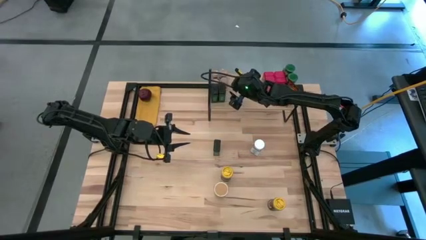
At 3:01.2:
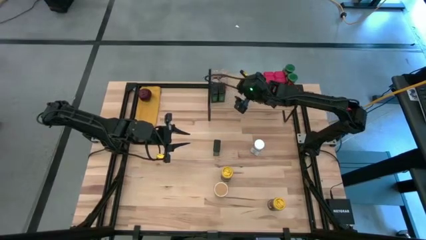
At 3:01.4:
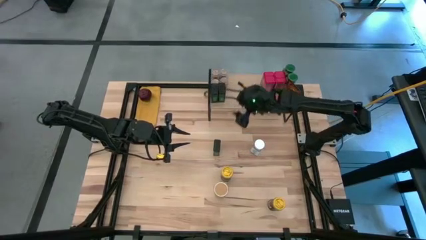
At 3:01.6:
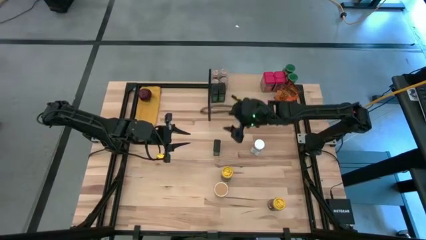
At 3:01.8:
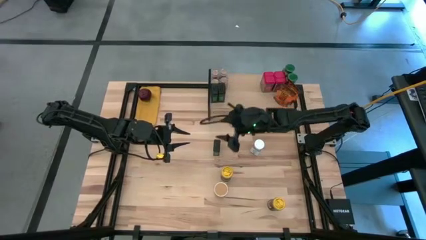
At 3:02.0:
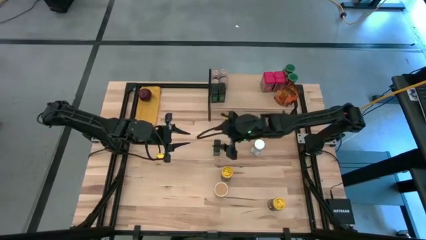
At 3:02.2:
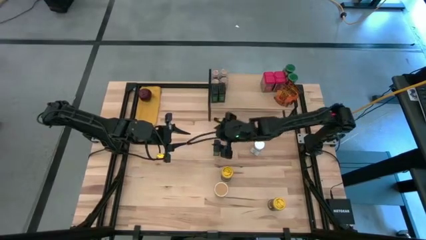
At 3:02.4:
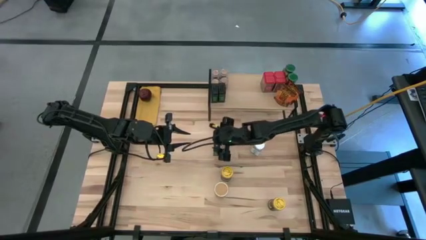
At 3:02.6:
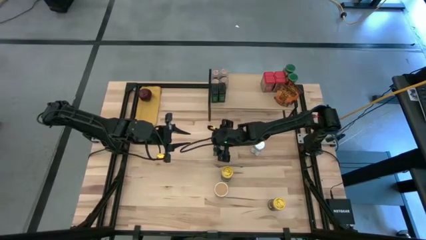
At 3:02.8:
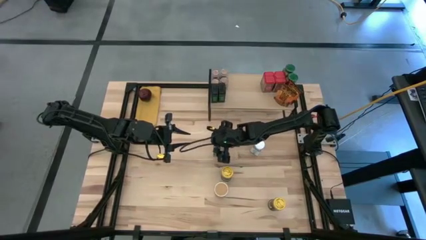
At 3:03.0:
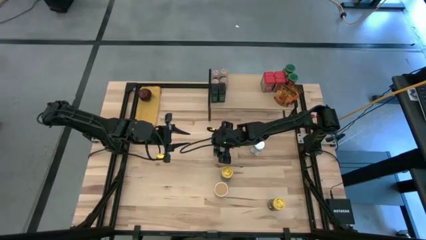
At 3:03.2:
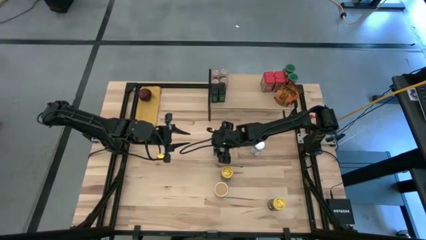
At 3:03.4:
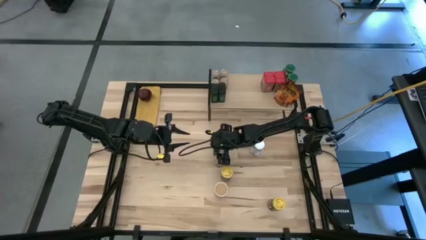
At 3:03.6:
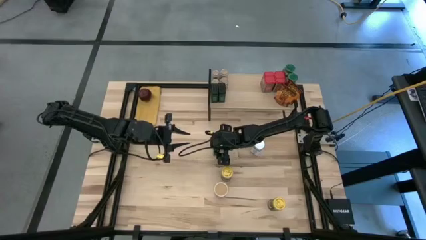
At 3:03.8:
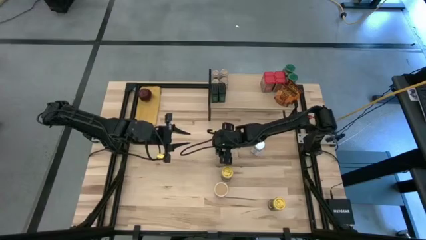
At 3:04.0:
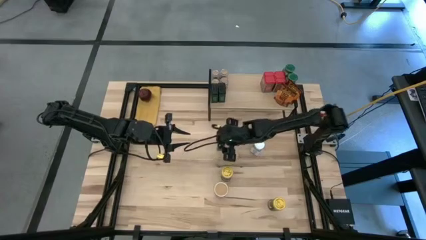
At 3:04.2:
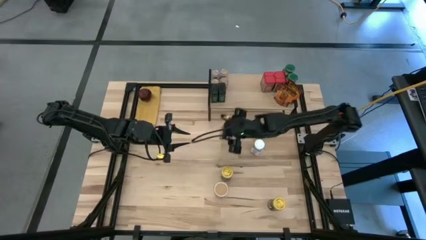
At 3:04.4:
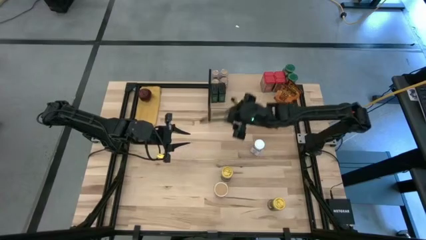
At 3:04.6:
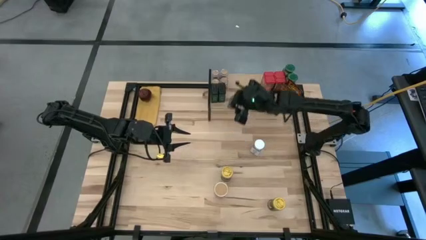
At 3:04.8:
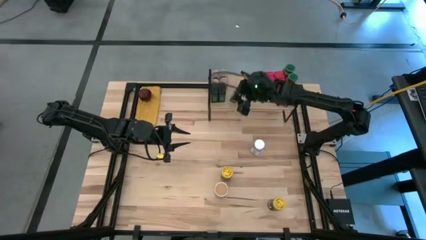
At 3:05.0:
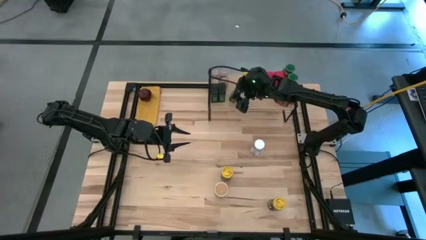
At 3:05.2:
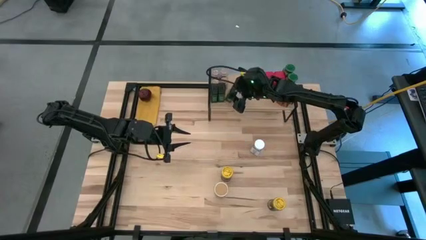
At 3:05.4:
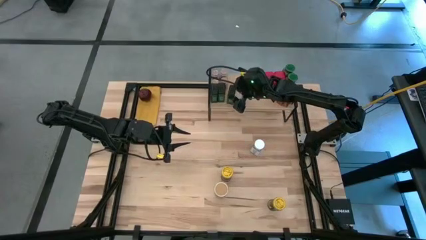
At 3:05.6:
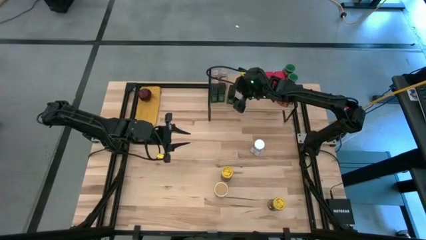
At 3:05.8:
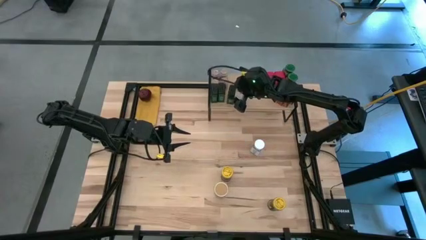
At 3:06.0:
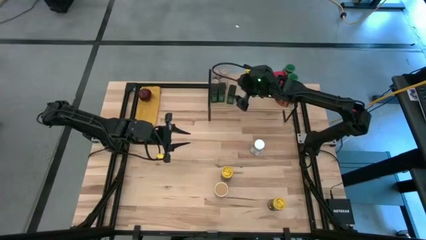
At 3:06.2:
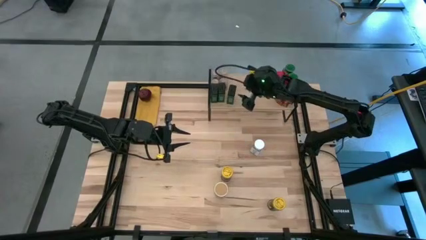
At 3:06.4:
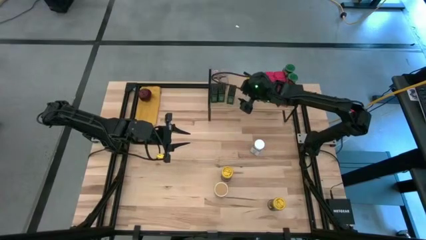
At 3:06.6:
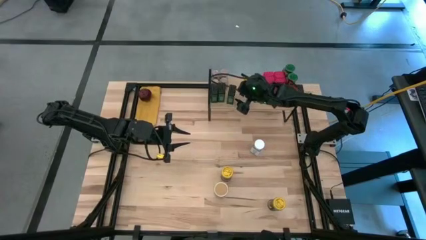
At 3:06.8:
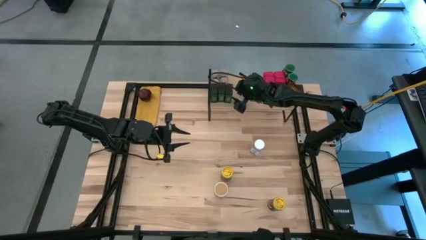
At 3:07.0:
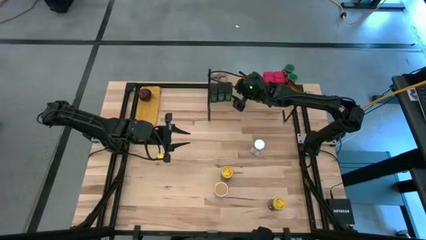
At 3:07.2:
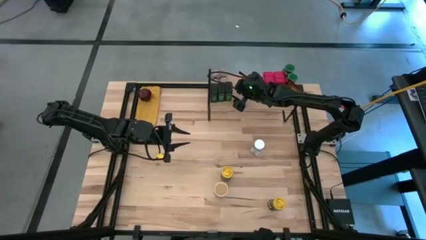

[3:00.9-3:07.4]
Task: Shelf spices
Put the black seasoning can on the shelf and align it with the other black seasoning cans

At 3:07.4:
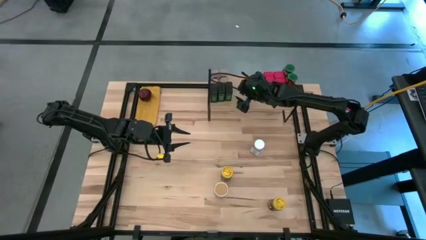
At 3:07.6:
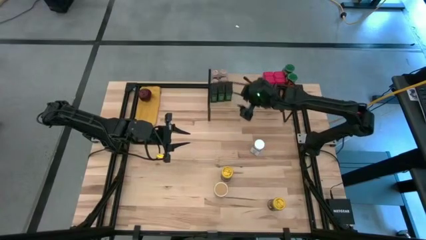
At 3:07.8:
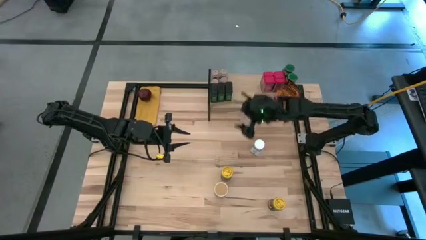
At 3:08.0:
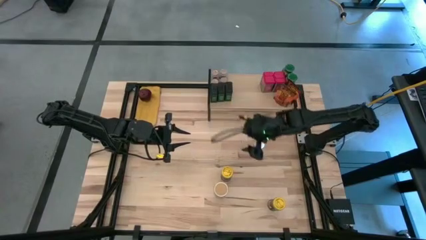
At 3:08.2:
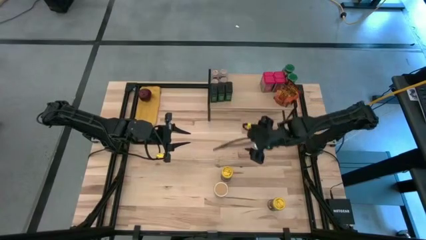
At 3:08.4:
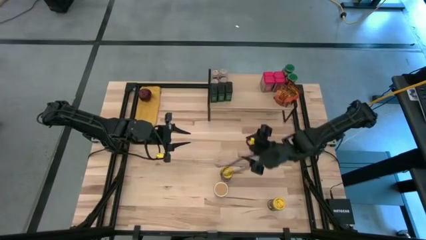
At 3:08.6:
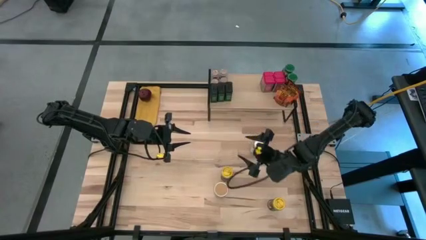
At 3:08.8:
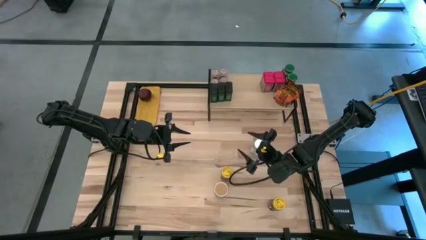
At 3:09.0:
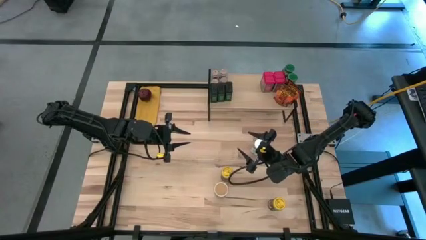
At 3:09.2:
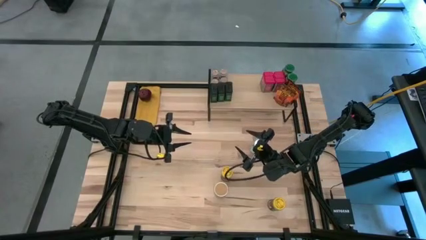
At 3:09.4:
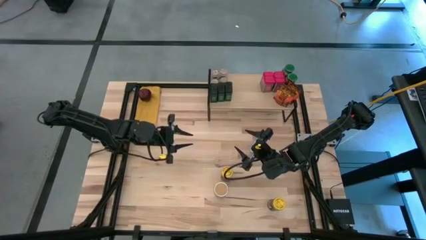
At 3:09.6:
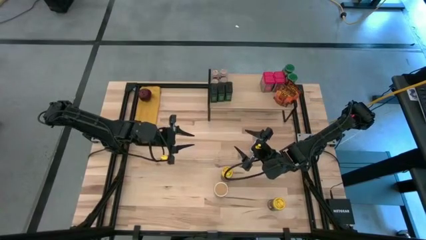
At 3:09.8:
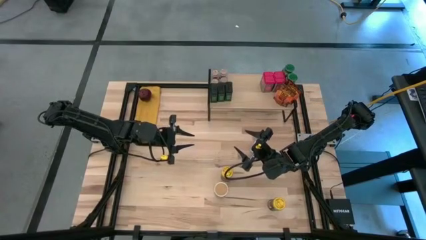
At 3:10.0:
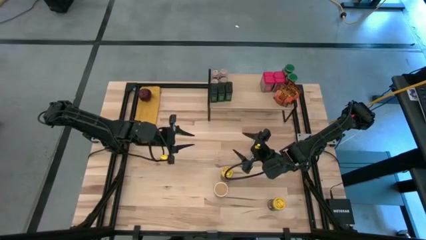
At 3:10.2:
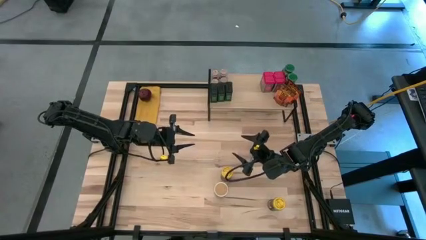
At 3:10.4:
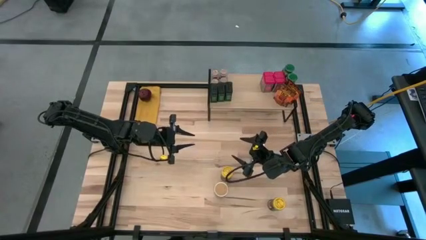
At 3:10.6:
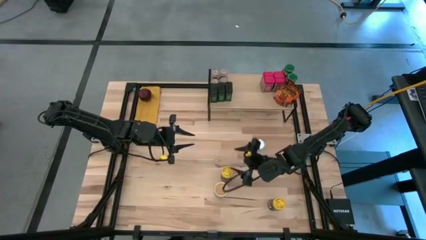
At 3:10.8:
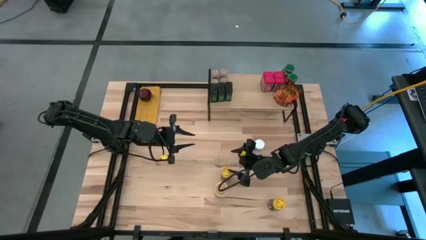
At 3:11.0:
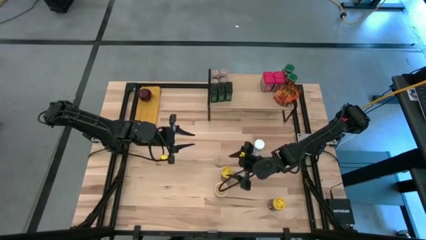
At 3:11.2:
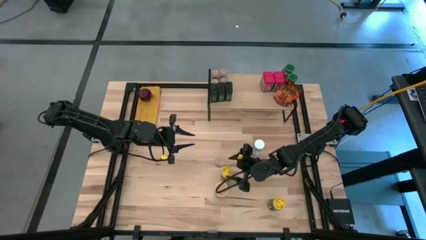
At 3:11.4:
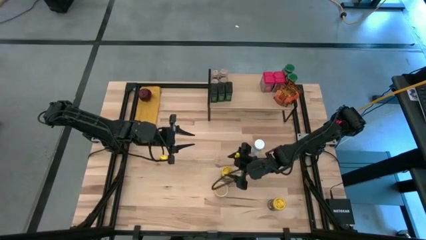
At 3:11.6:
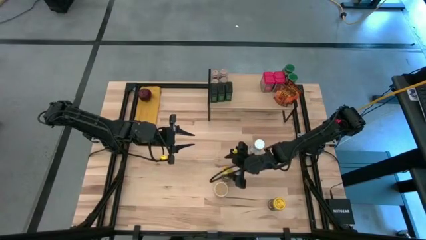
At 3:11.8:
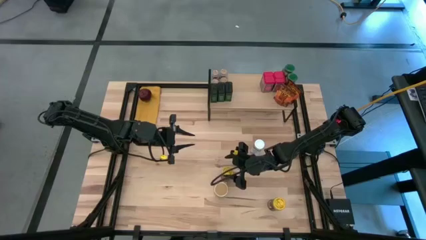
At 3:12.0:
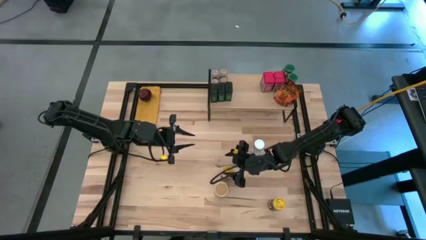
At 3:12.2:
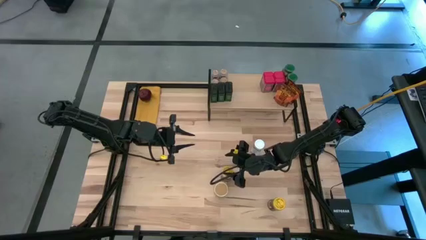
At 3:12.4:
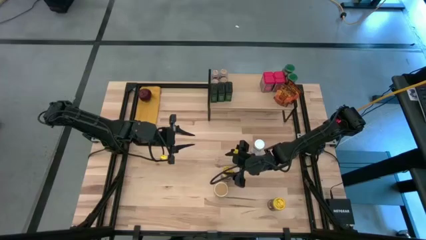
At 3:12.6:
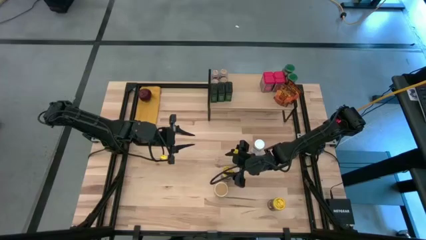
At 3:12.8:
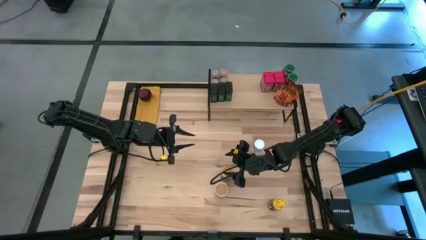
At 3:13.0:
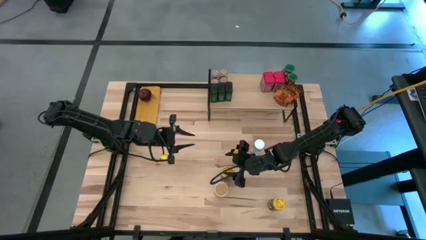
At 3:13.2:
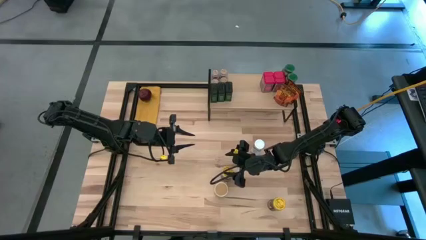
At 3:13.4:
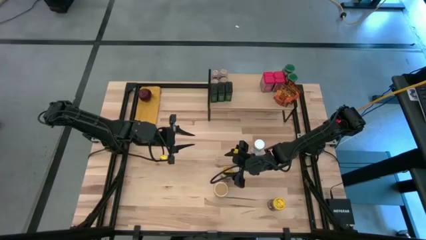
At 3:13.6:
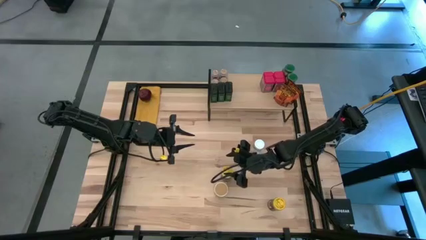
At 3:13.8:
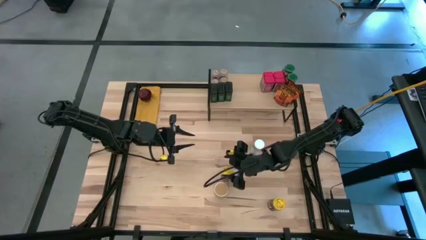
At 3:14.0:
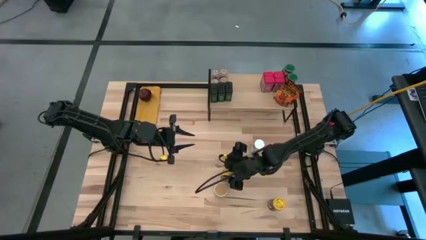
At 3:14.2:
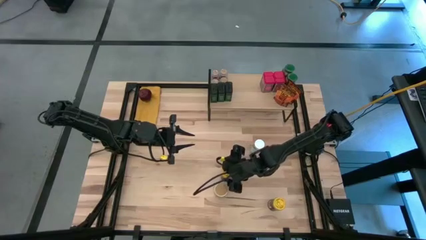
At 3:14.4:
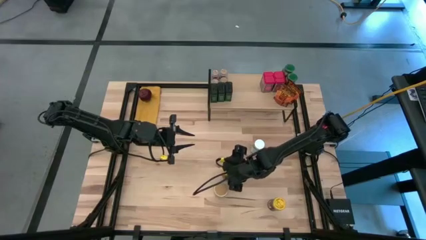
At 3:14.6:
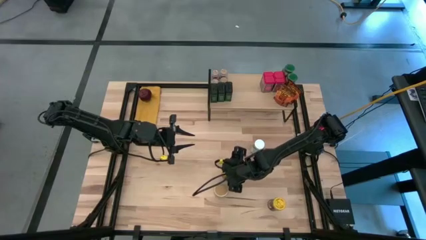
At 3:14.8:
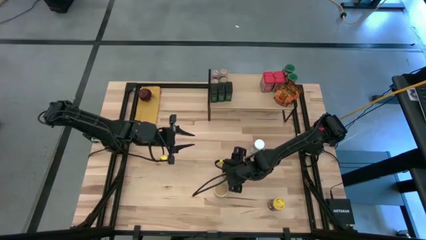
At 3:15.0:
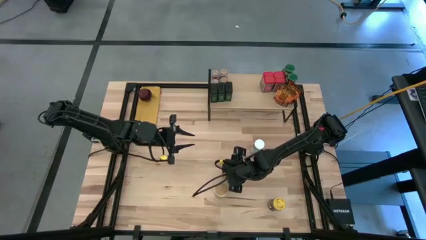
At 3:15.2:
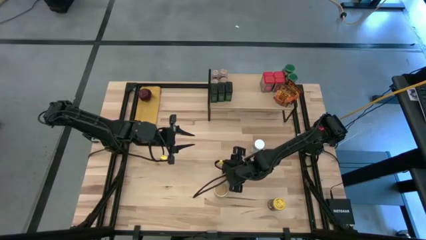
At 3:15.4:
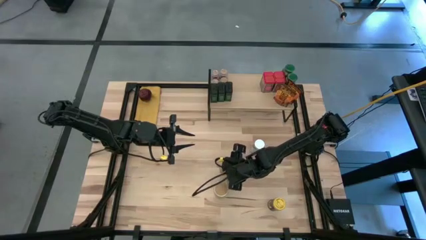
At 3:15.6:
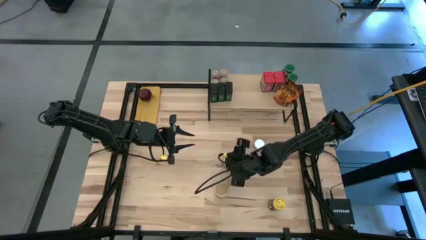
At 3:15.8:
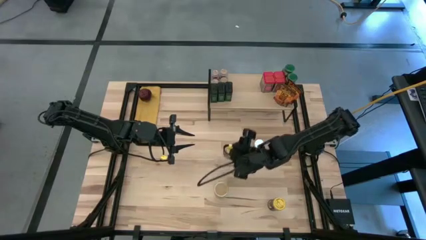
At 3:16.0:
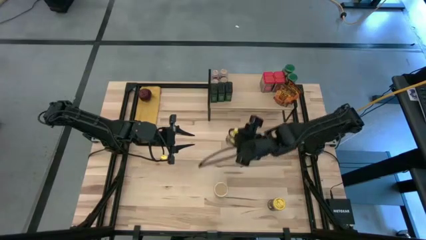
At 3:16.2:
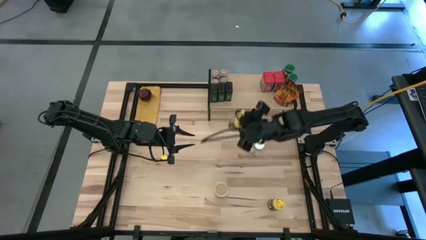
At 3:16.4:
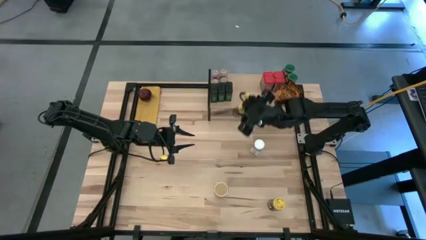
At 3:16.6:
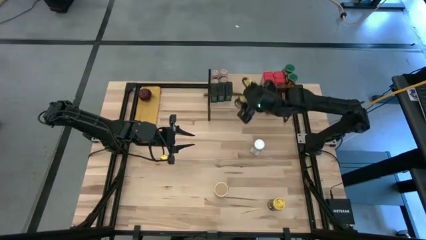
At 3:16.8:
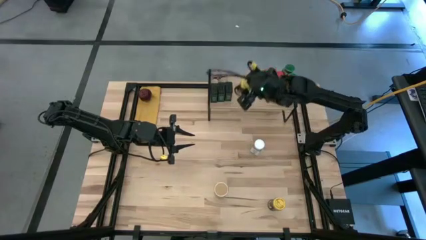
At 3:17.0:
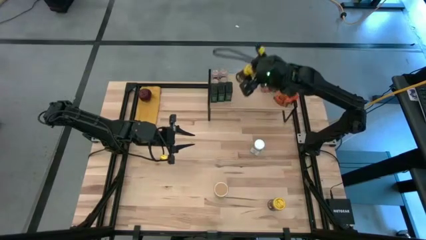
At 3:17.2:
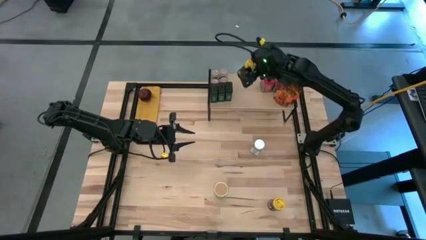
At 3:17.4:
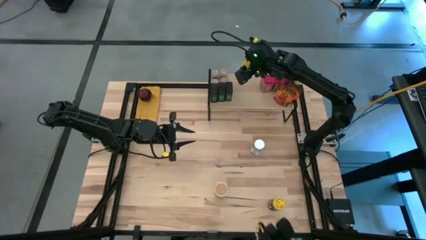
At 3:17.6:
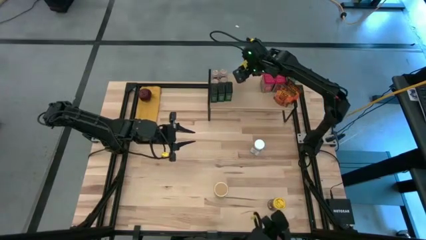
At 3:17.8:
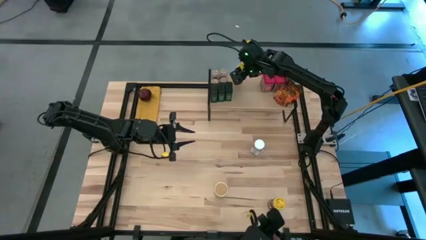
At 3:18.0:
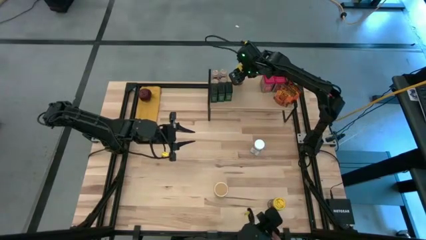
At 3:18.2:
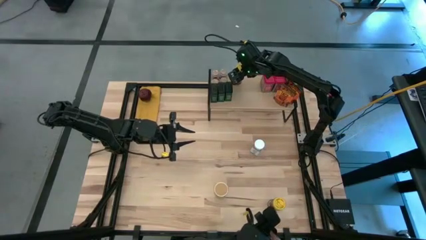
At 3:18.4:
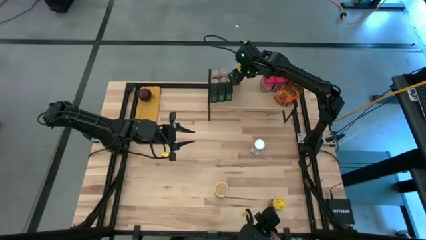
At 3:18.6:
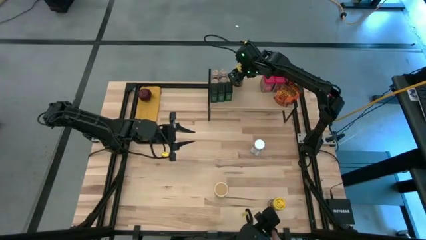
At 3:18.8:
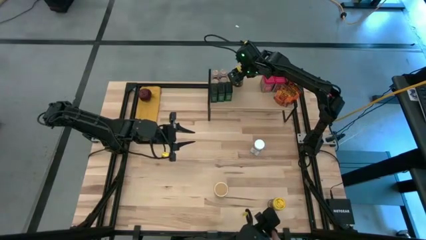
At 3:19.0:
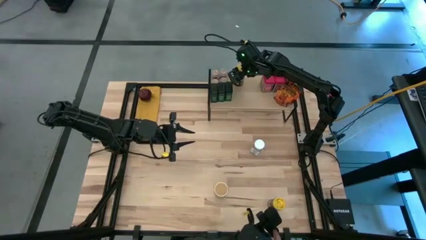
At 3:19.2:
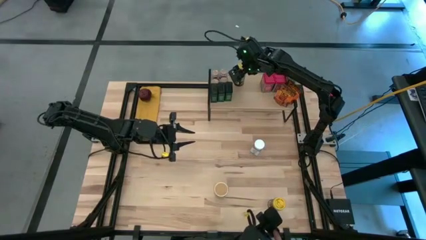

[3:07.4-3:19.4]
Put the left yellow seasoning bottle on the shelf
